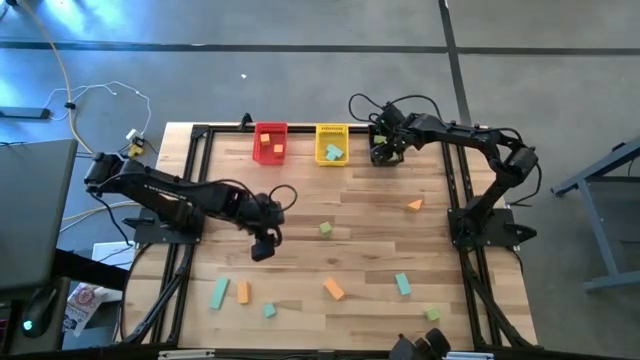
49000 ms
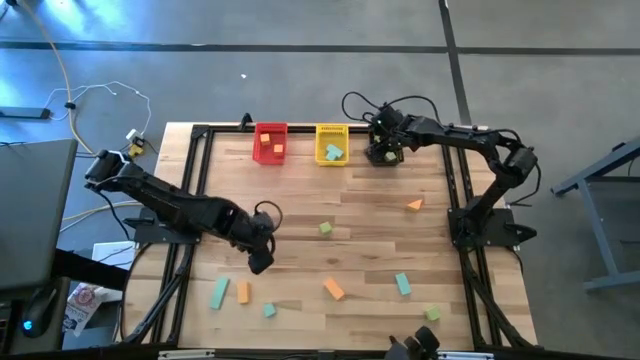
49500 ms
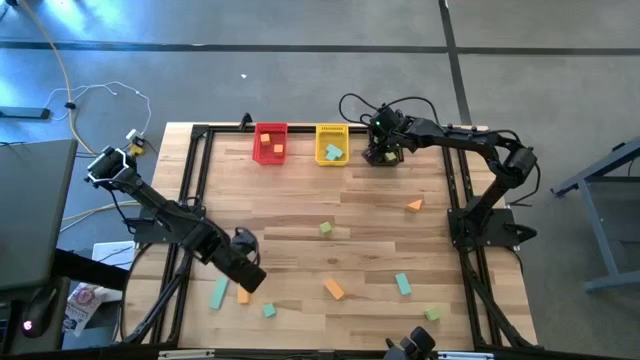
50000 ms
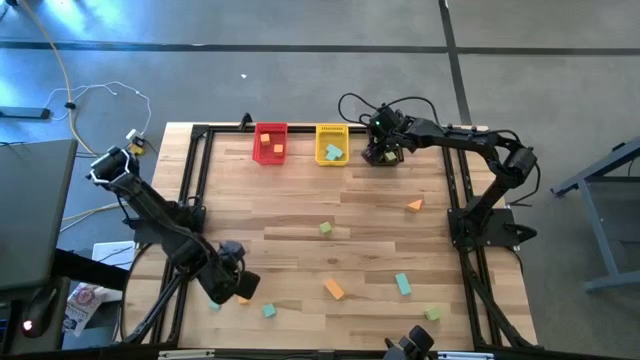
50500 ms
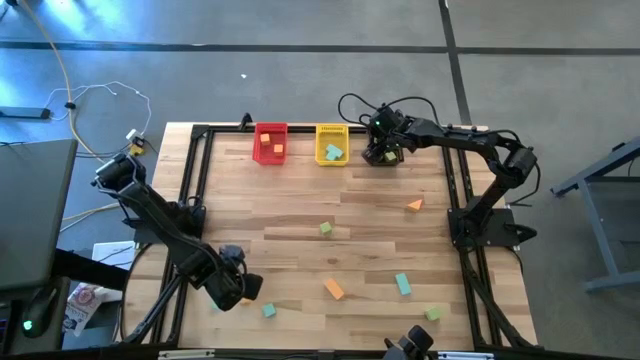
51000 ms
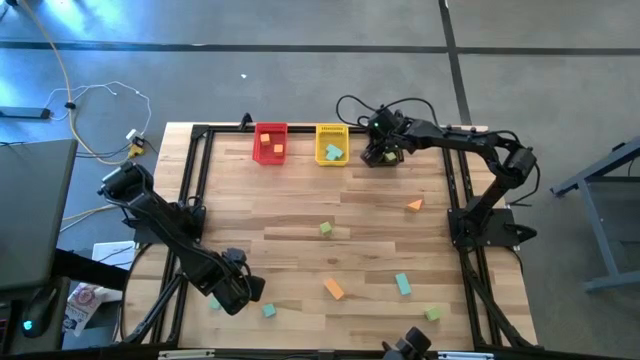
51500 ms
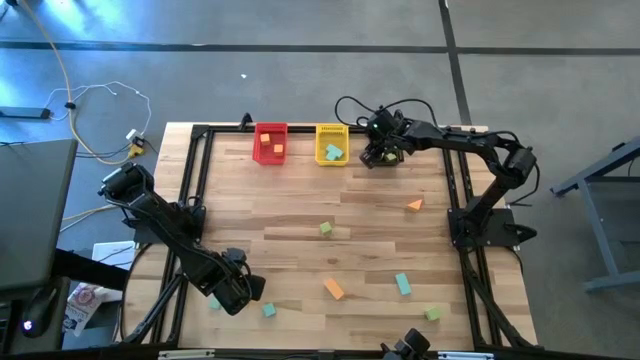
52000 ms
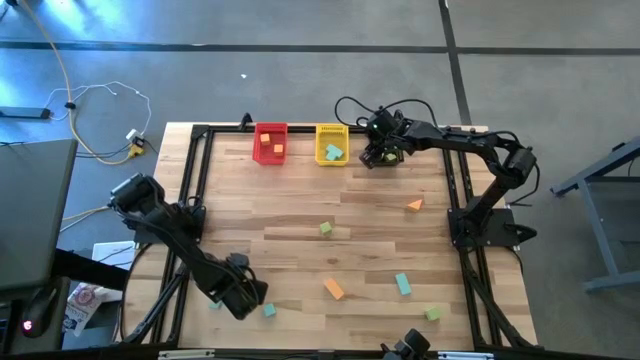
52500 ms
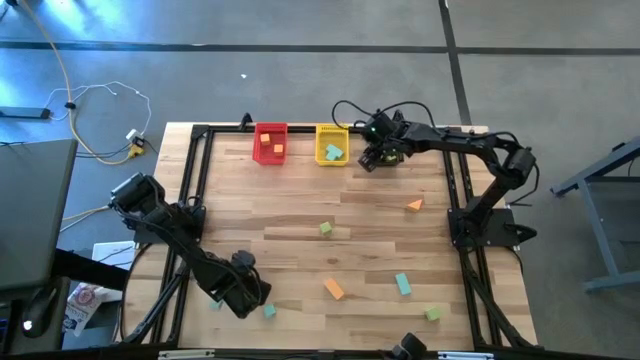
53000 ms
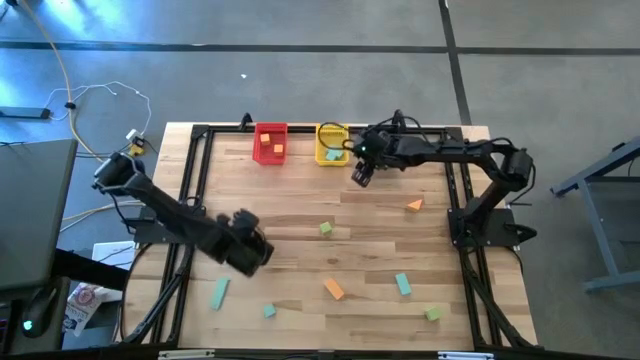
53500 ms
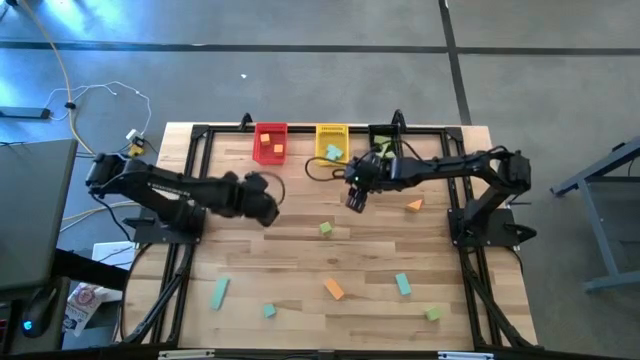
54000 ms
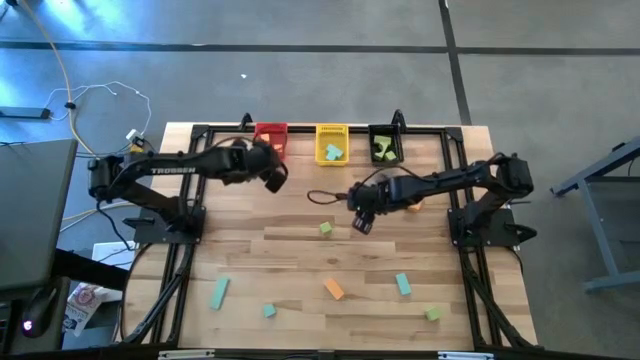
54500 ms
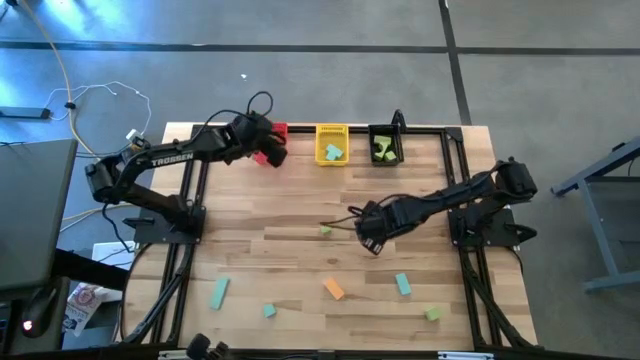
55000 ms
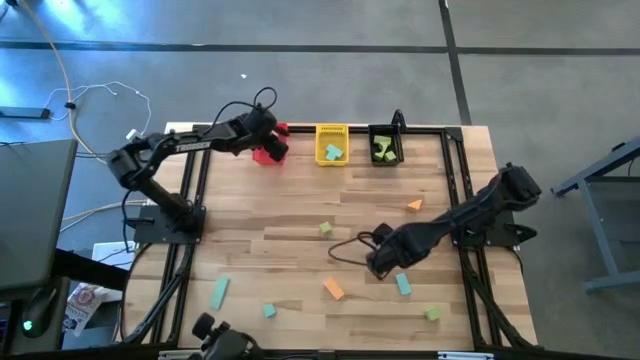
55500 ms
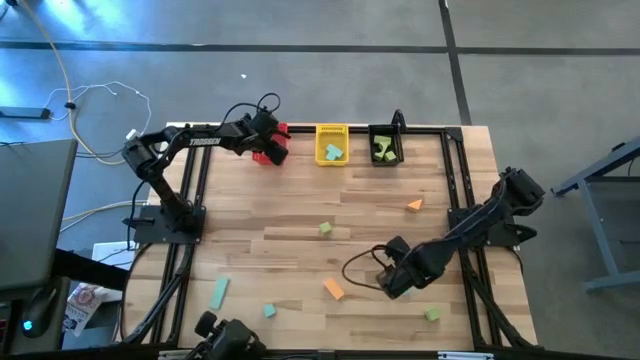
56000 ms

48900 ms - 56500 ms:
Task: Sort & place blocks by color
Put the orange block into the red bin

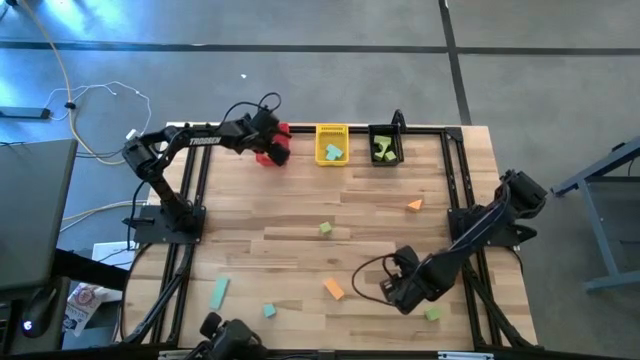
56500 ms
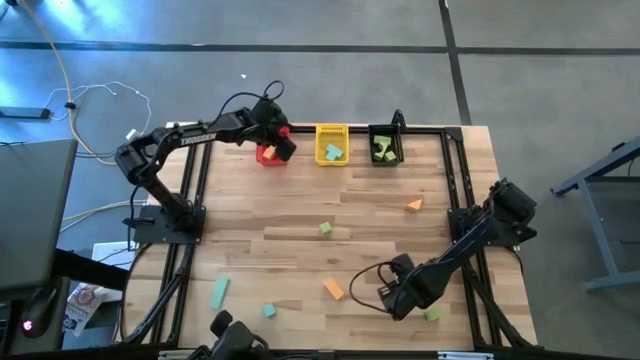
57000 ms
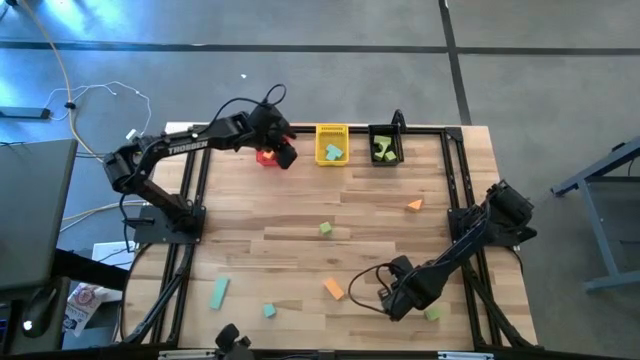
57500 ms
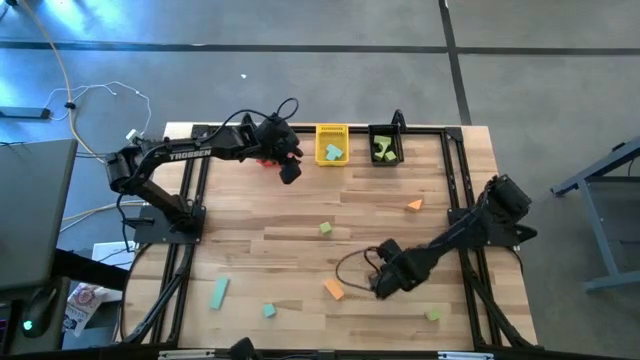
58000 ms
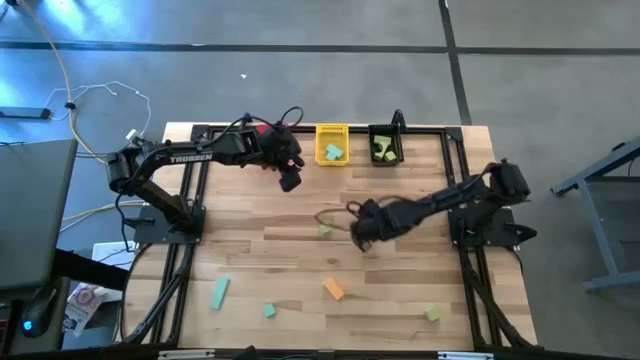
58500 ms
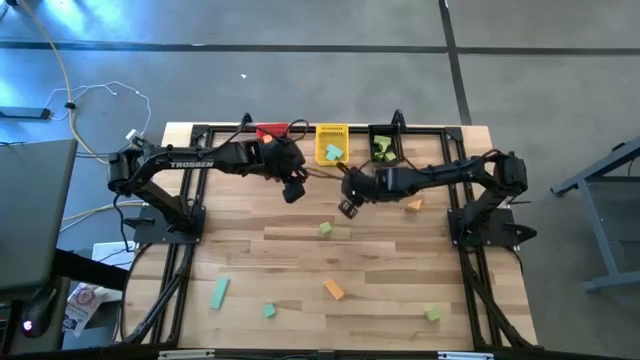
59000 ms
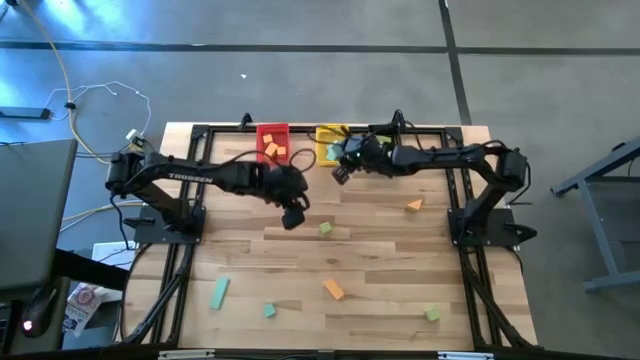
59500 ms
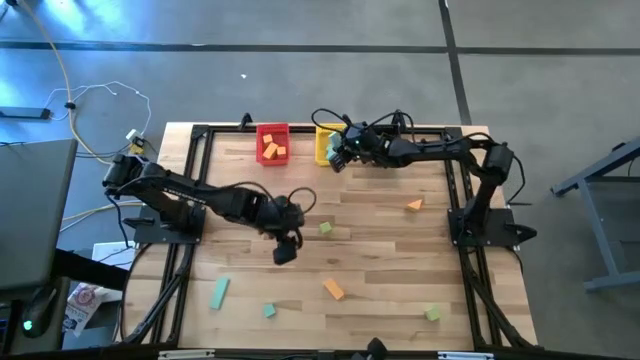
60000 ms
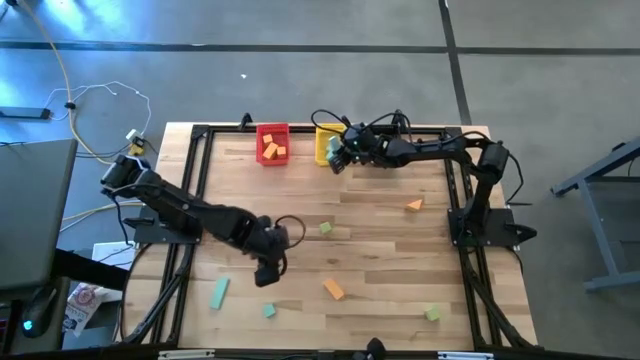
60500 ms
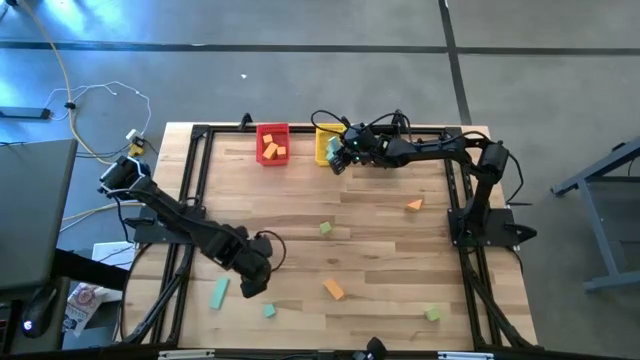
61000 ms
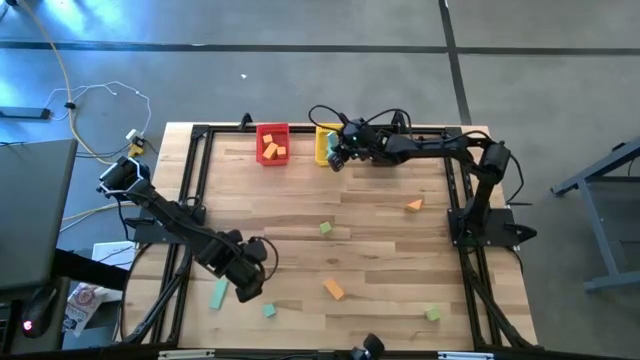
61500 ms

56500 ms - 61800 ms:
Put the blue block into the yellow bin

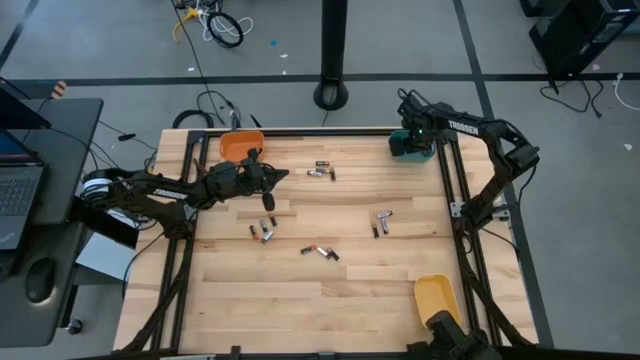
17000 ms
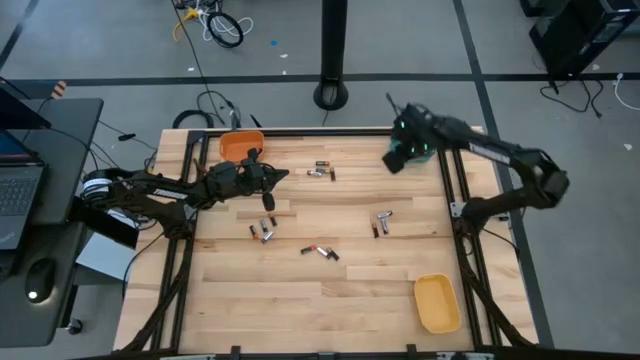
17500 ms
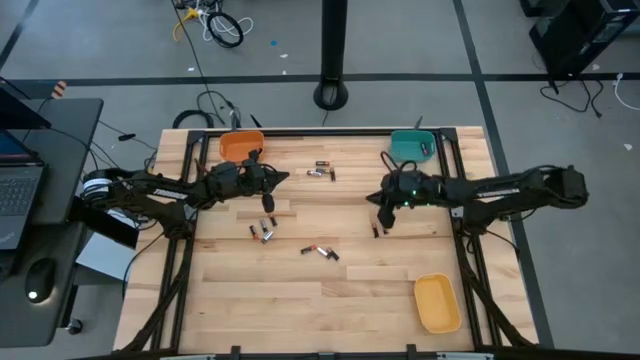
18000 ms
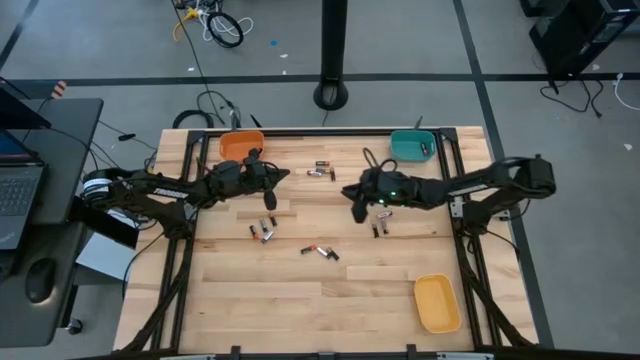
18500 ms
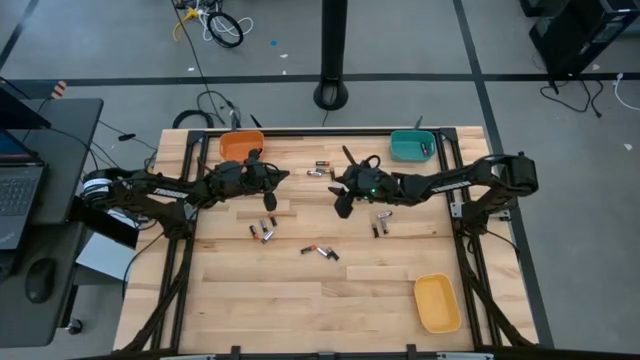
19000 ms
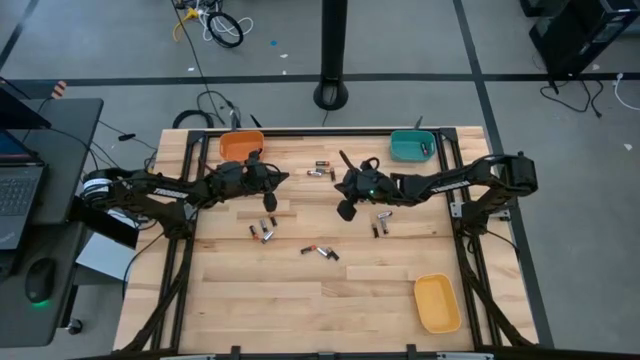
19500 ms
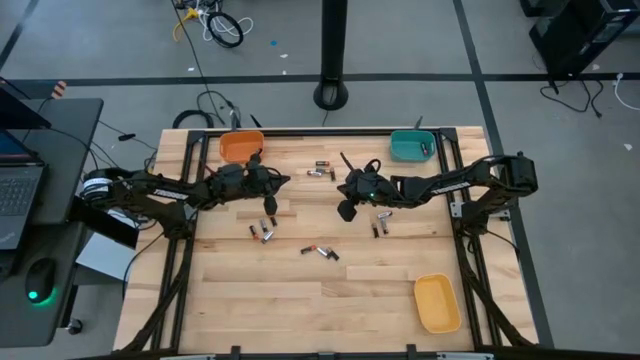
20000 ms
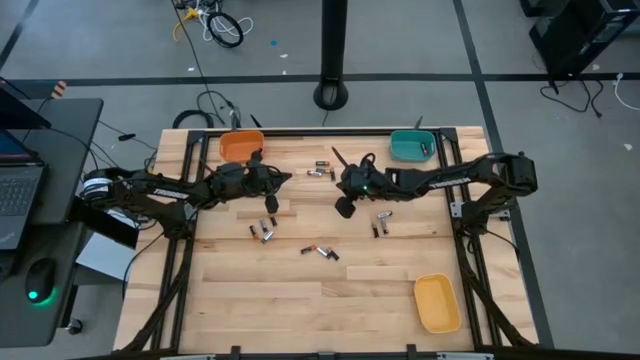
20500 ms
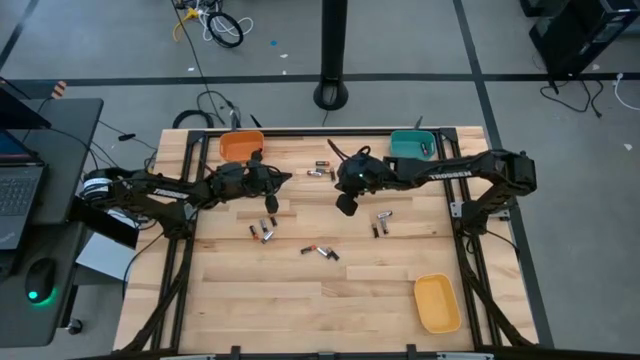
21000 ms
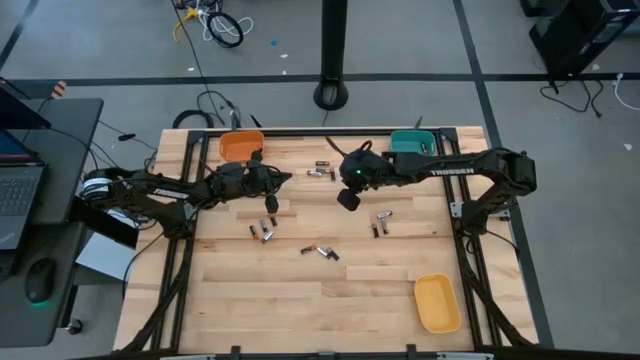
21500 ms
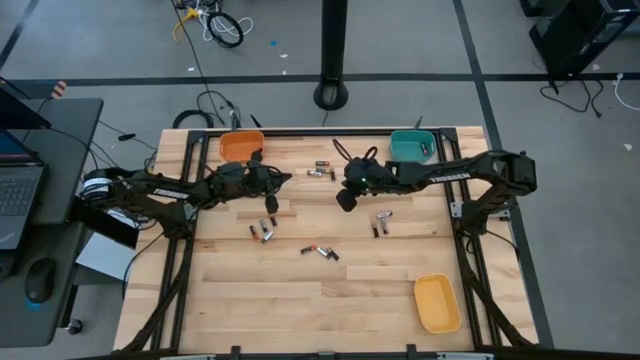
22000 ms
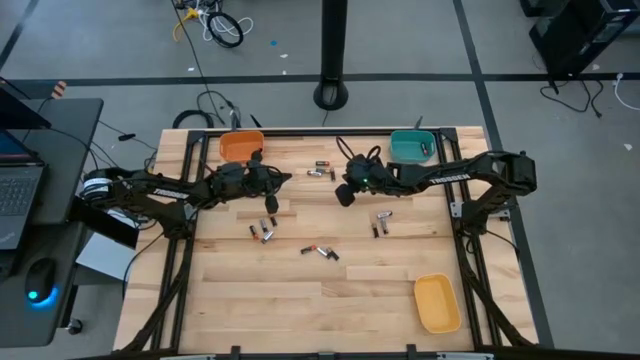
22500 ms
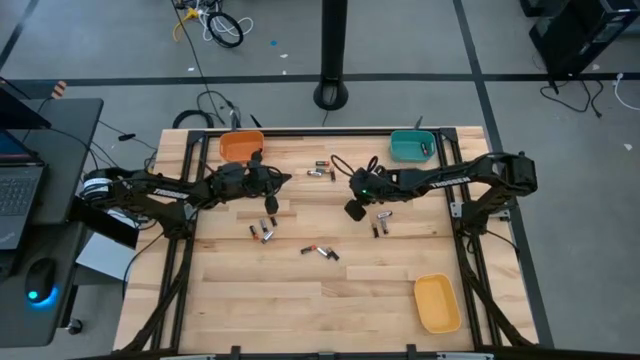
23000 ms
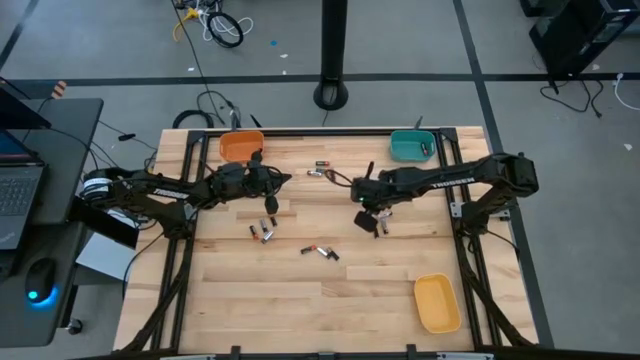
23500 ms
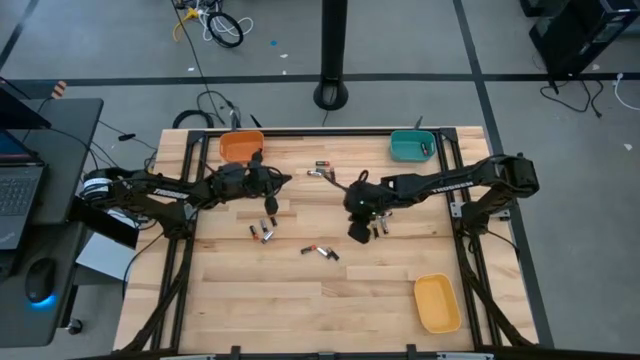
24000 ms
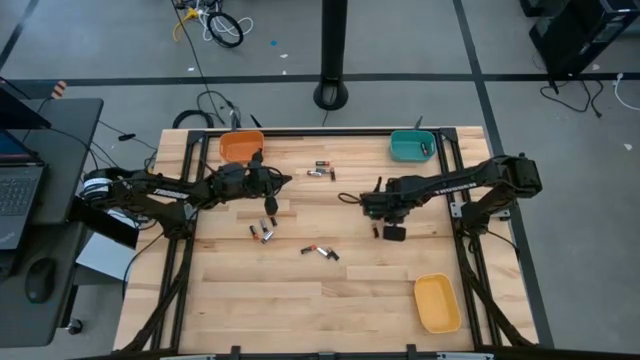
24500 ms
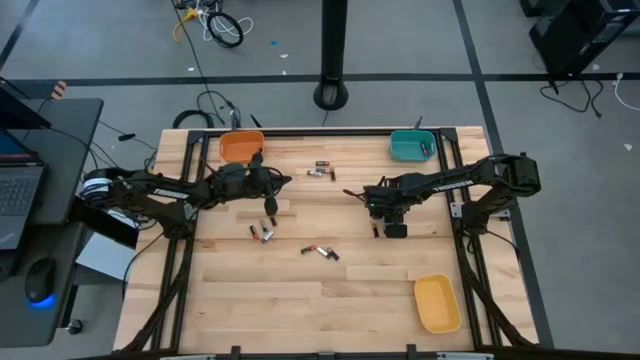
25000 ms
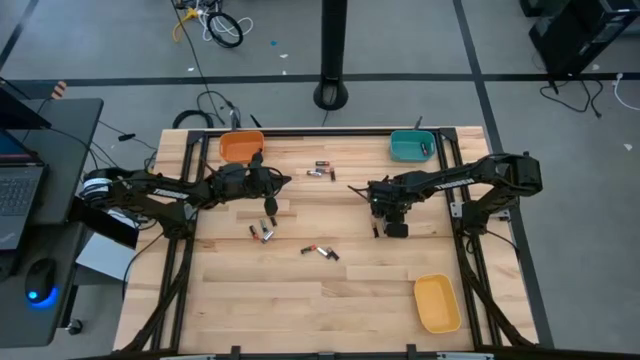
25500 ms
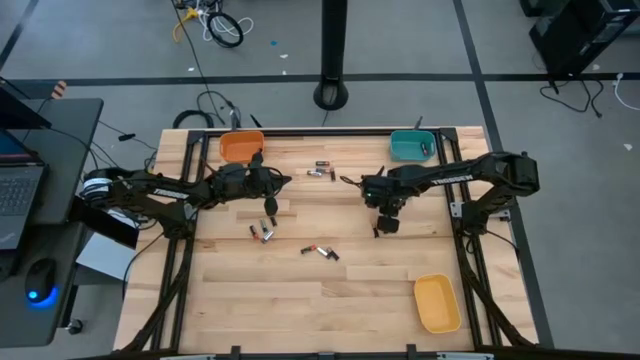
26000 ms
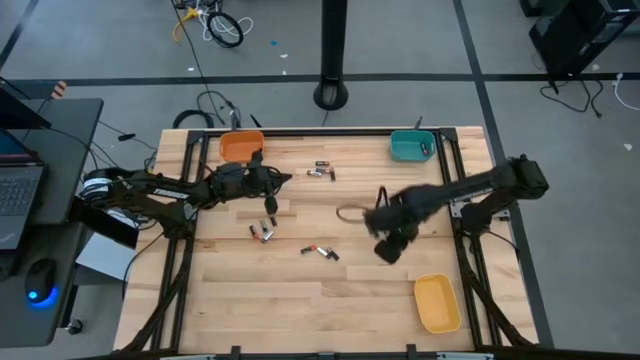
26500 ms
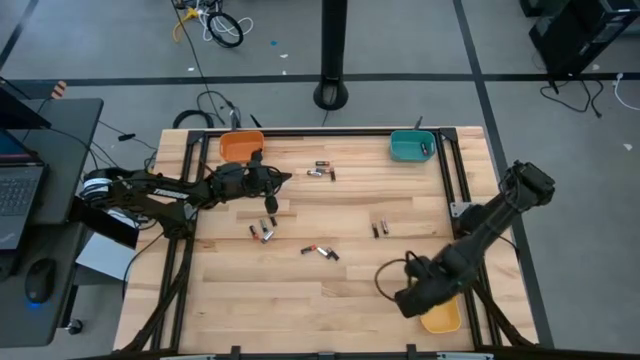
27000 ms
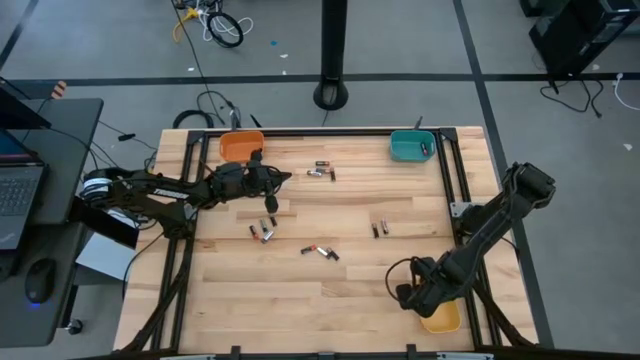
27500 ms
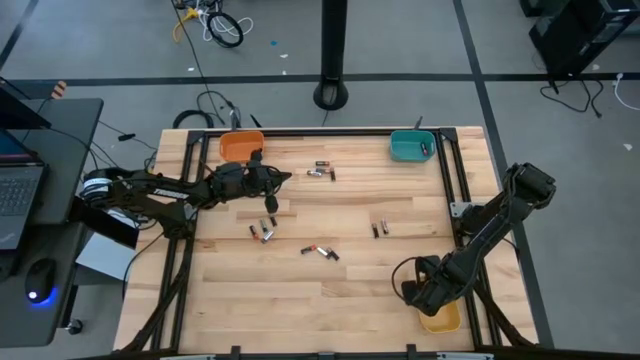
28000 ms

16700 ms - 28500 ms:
Task: Sort batteries
Put the silver battery into the yellow bin
